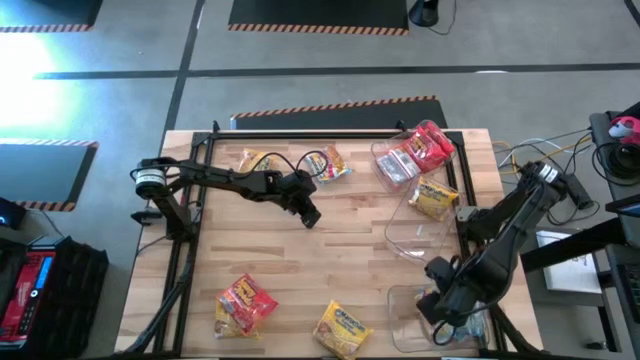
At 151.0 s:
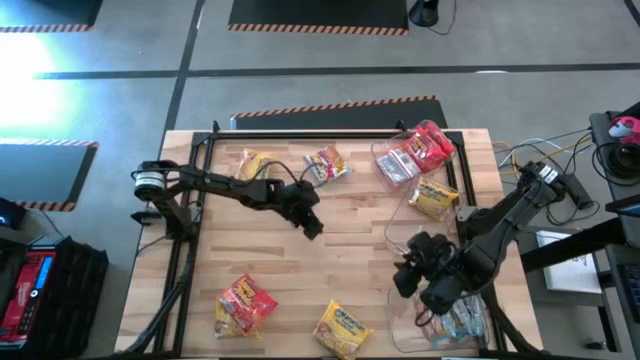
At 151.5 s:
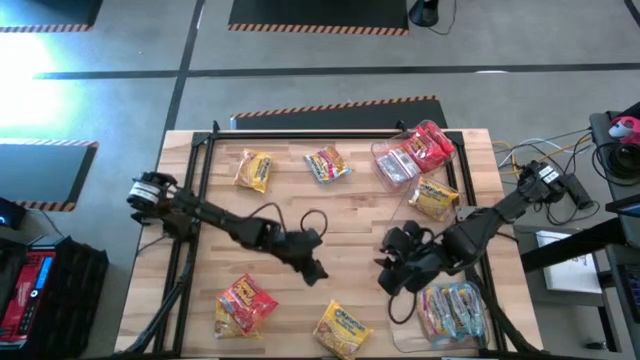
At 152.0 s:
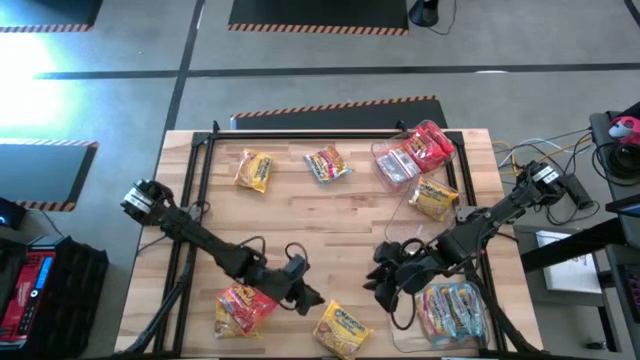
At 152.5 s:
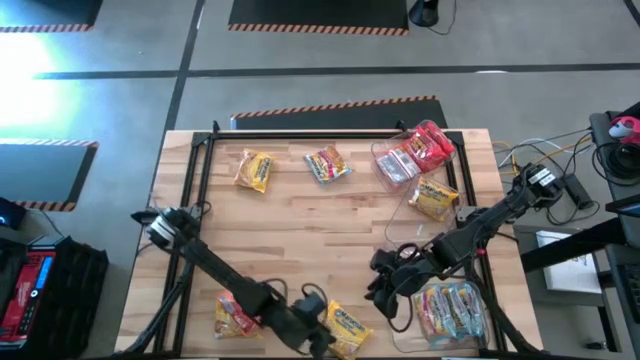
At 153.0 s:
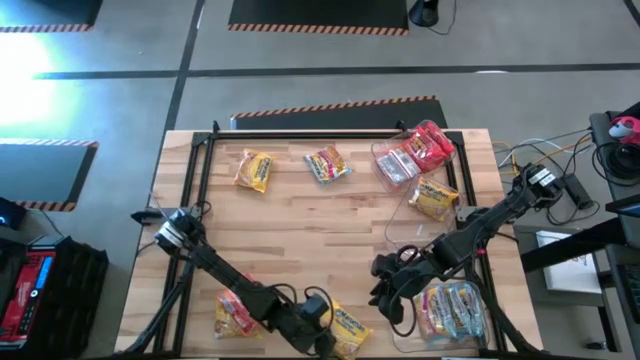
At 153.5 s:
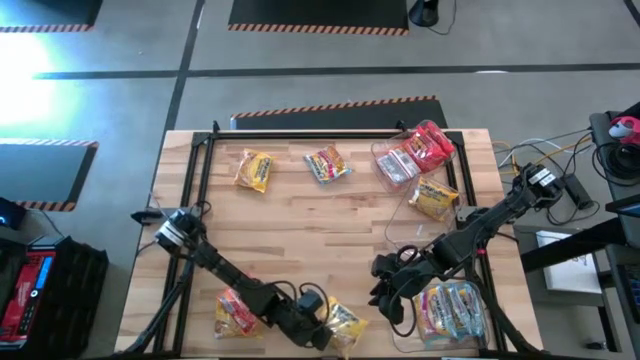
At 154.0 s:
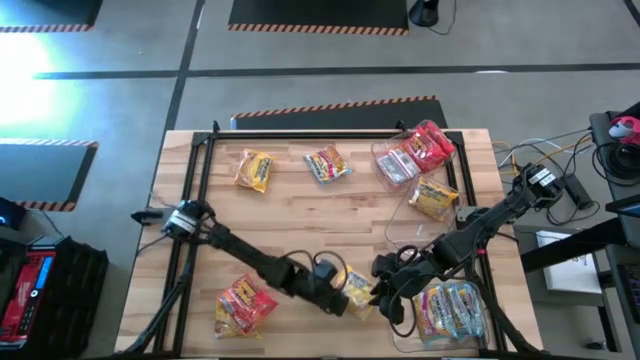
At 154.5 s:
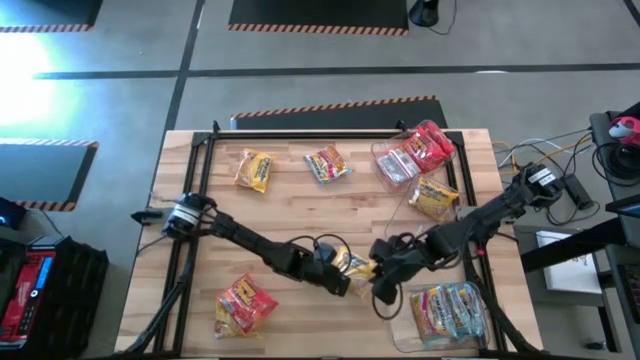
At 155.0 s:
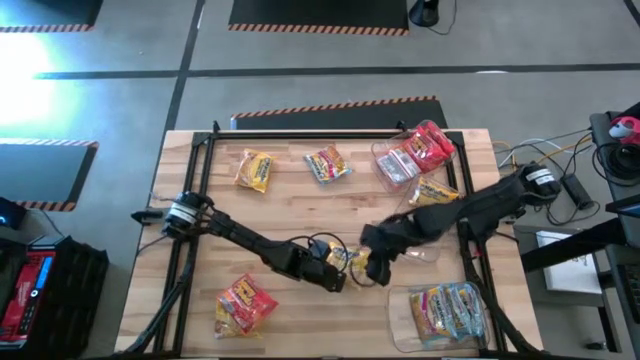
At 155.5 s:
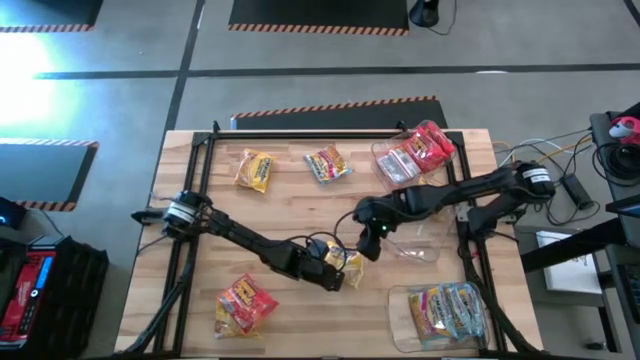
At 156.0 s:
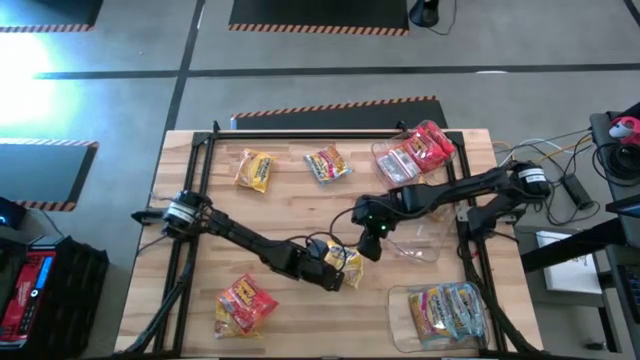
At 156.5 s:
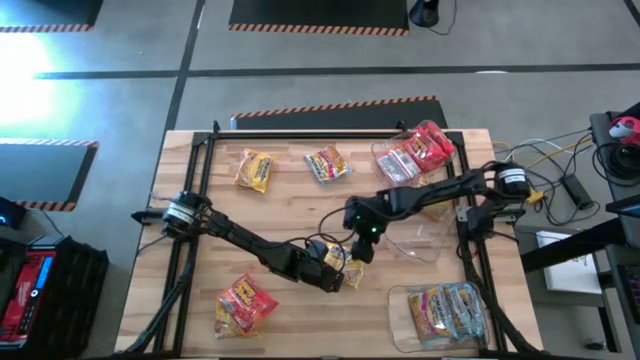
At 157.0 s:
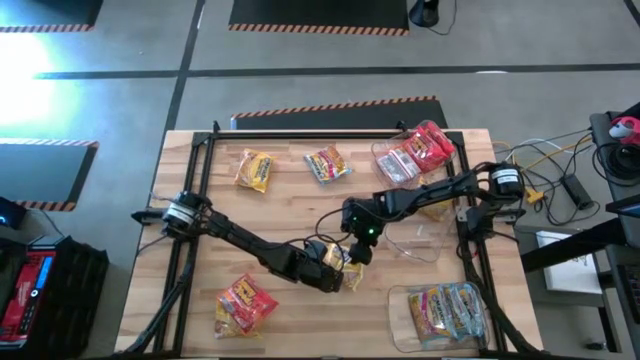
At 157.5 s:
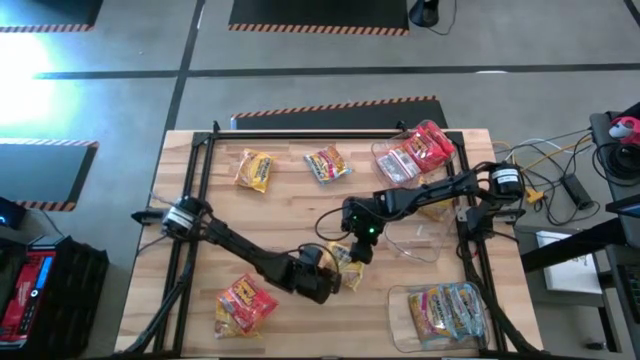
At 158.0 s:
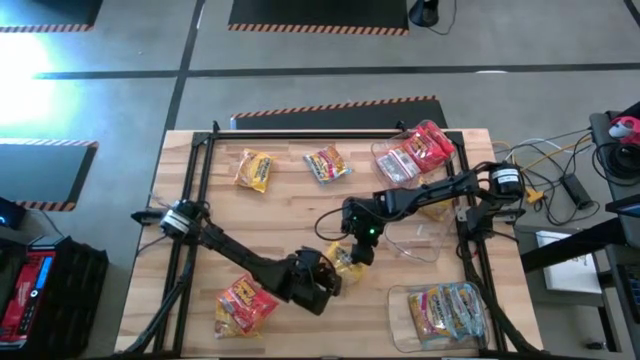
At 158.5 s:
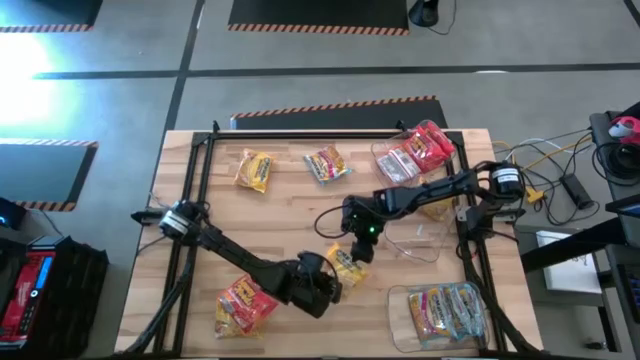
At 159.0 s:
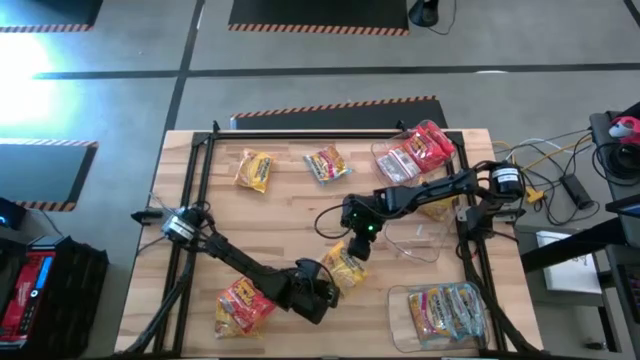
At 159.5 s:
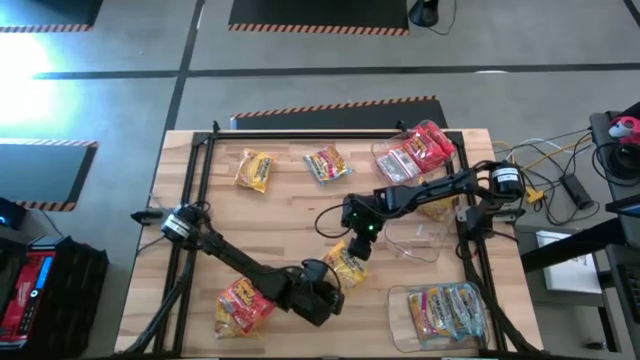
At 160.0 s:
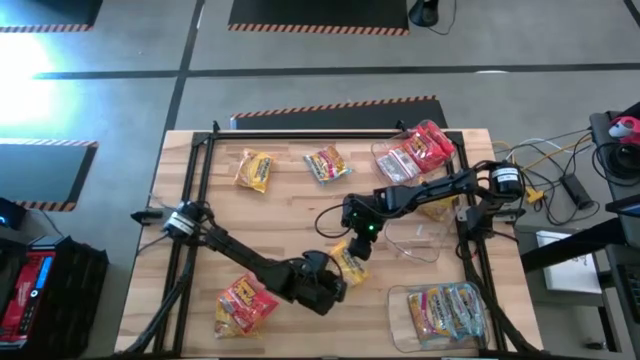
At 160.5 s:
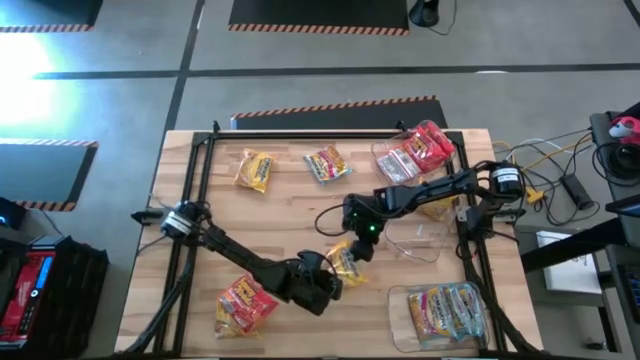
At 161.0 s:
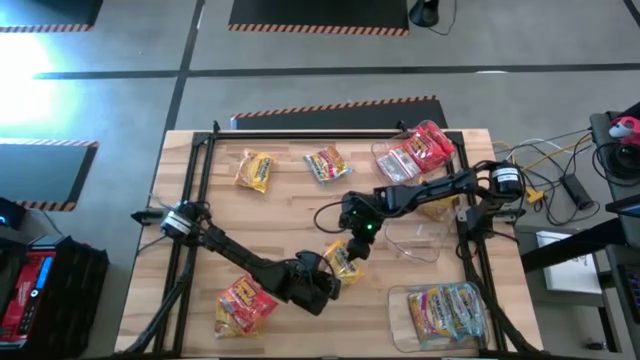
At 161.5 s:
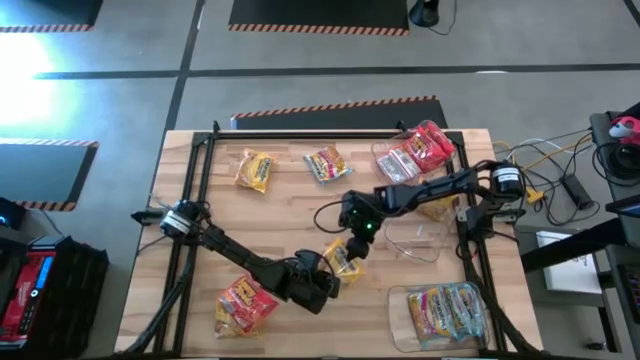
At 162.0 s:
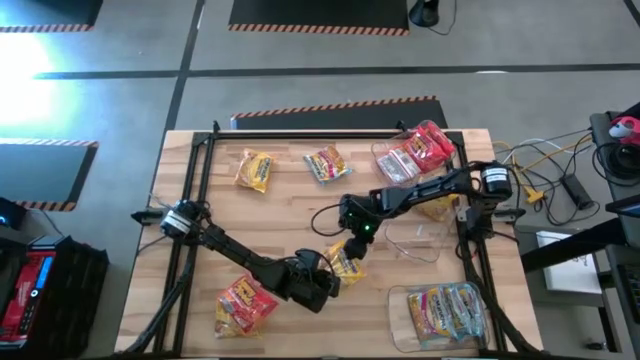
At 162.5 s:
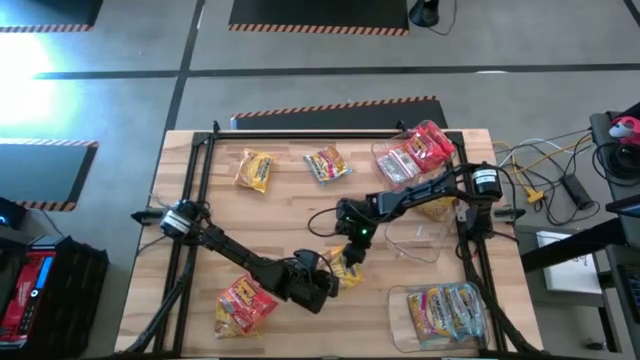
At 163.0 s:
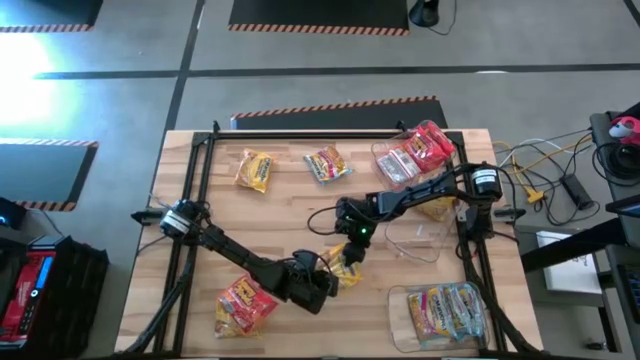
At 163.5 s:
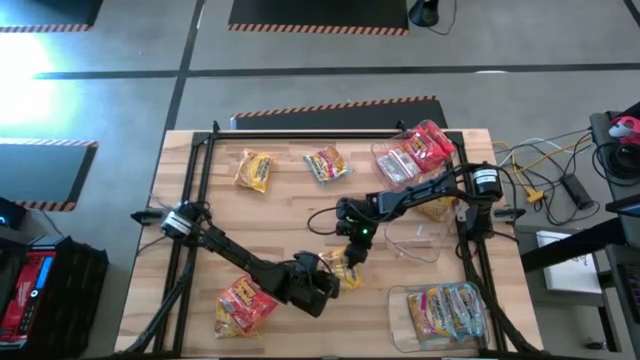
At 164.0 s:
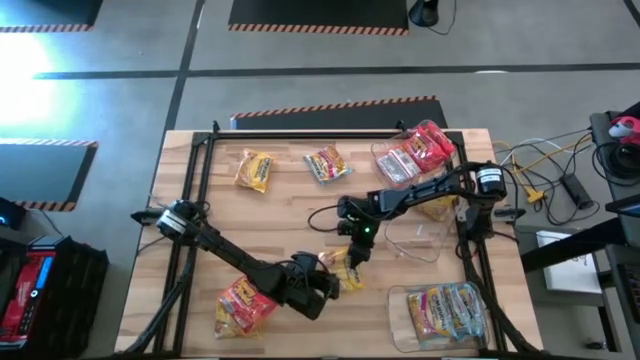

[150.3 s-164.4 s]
Task: Sort Maruchan noodles
Put the yellow noodle pack into the middle transparent bin

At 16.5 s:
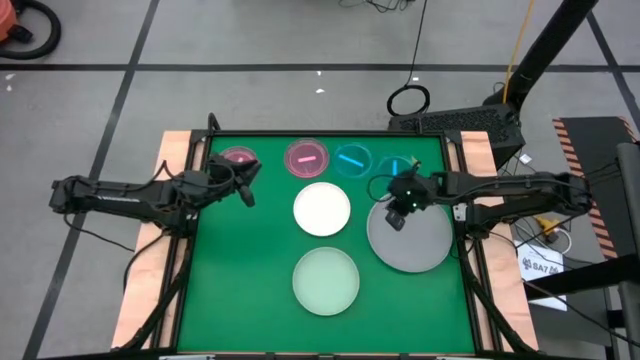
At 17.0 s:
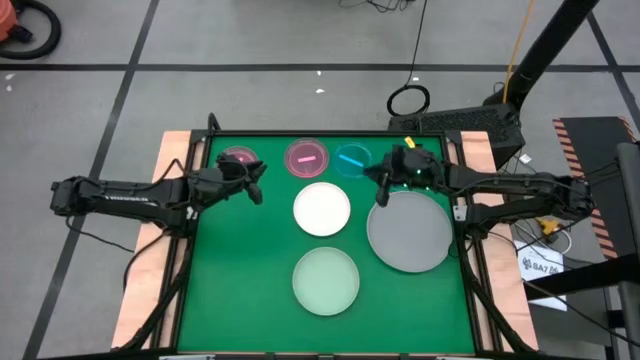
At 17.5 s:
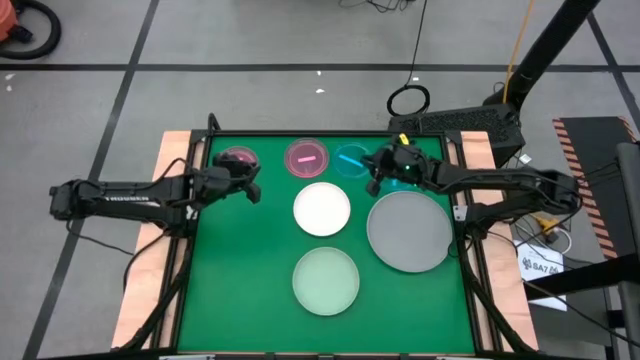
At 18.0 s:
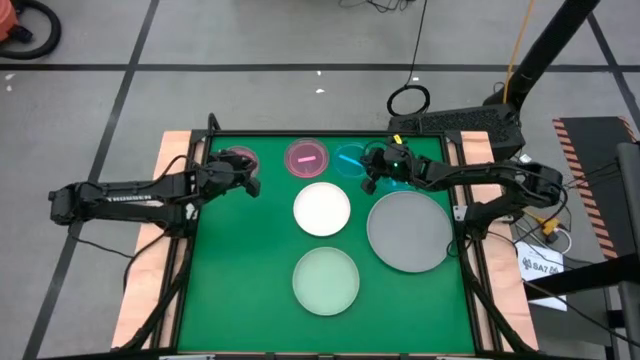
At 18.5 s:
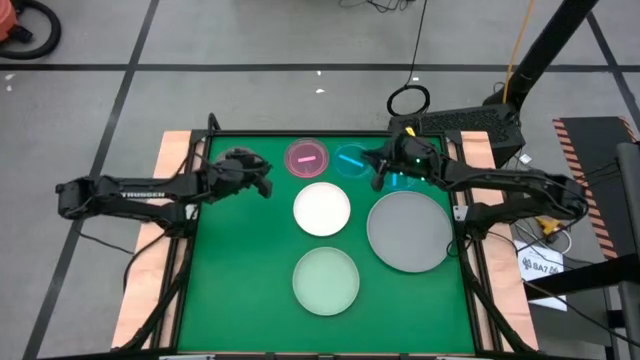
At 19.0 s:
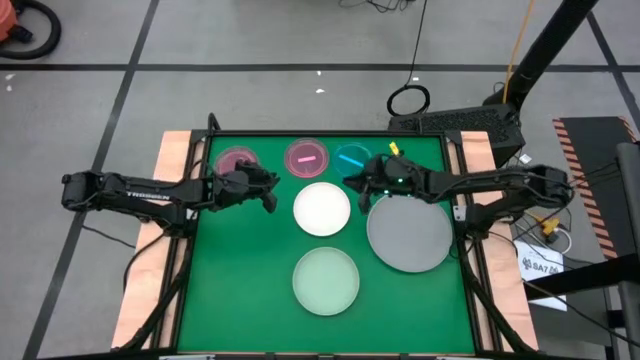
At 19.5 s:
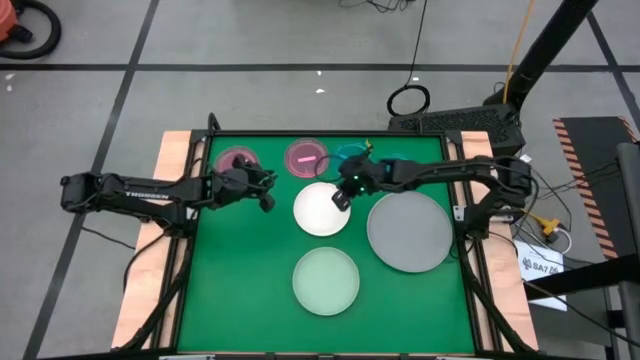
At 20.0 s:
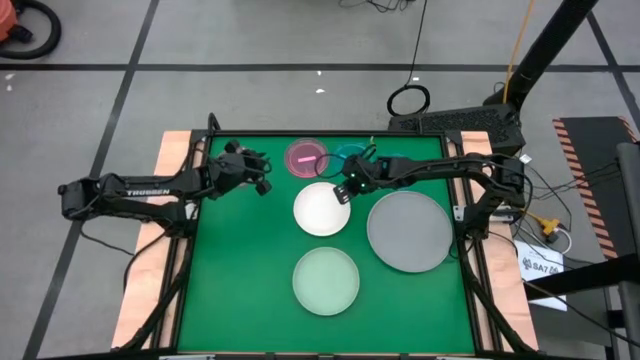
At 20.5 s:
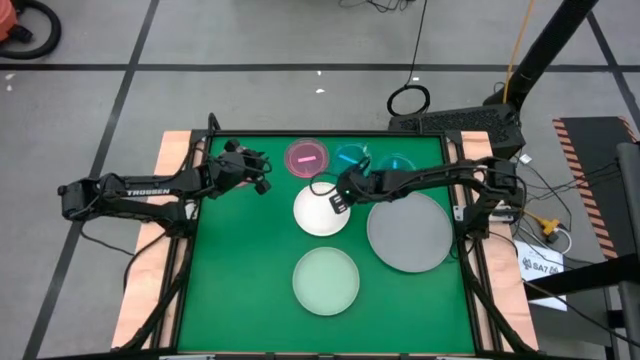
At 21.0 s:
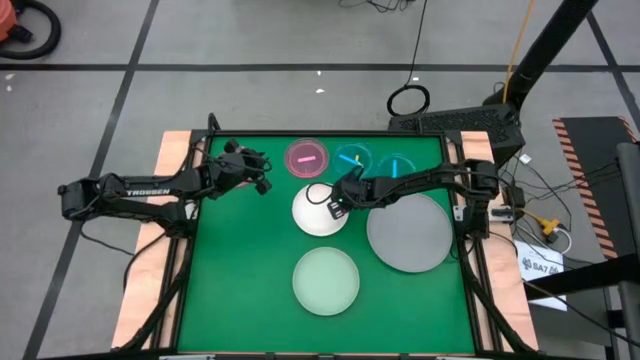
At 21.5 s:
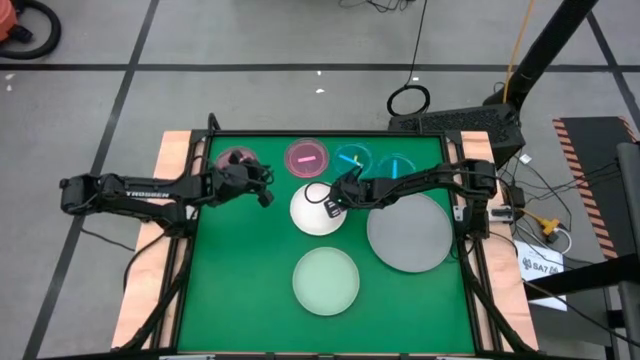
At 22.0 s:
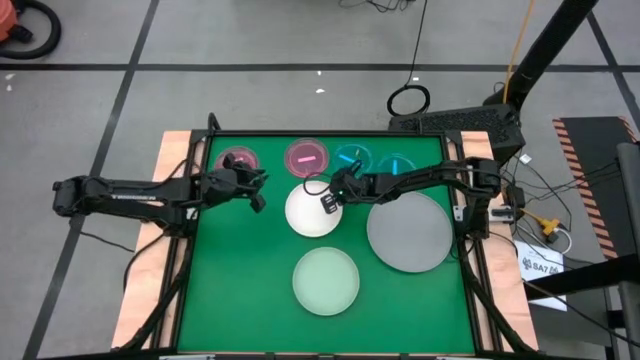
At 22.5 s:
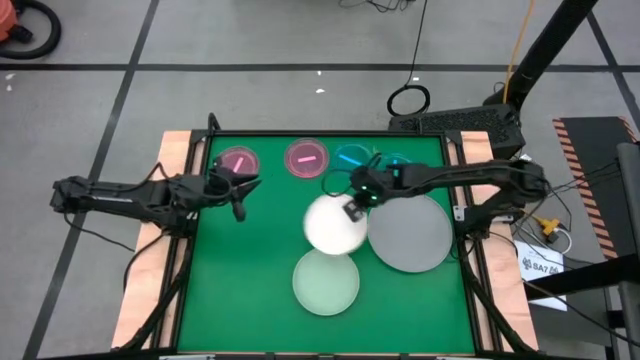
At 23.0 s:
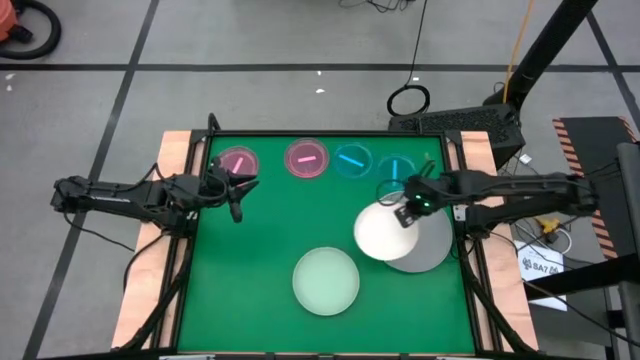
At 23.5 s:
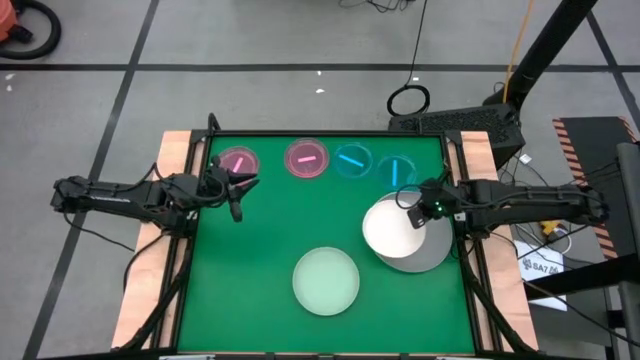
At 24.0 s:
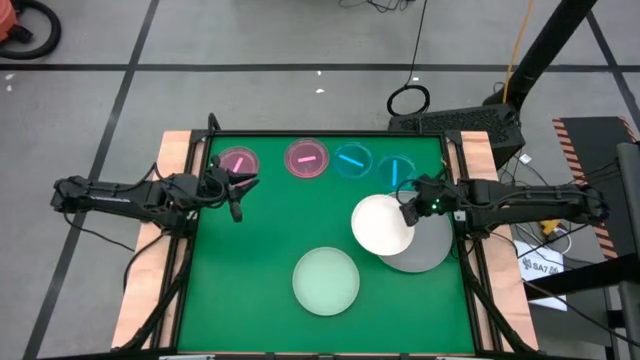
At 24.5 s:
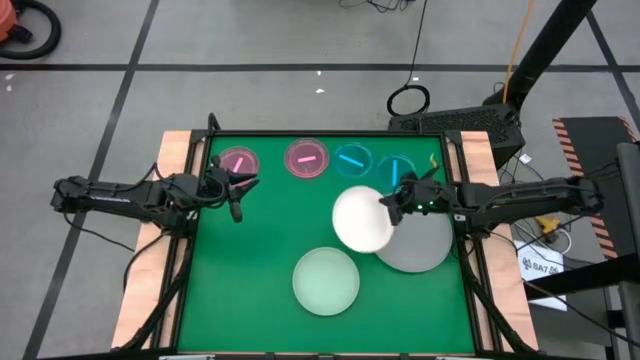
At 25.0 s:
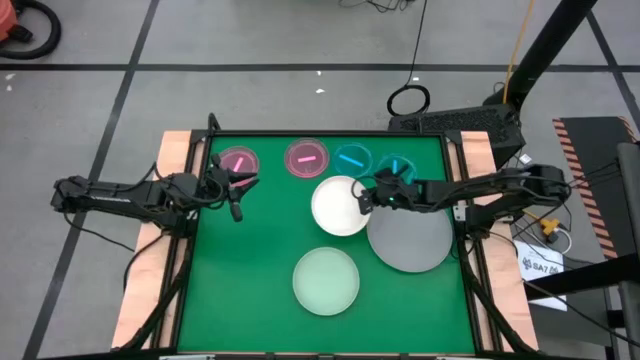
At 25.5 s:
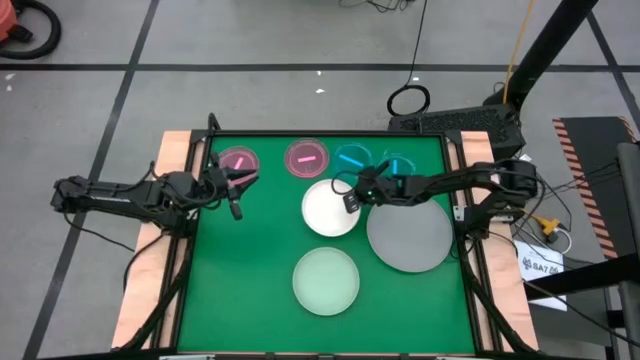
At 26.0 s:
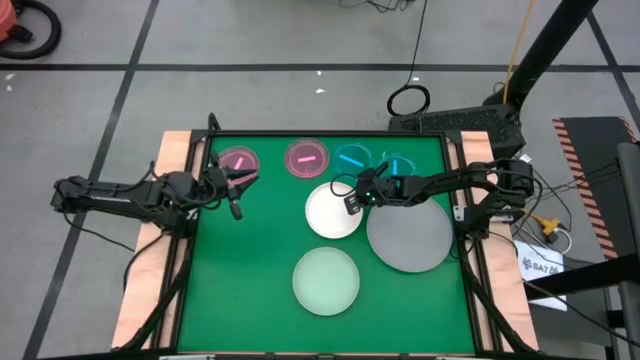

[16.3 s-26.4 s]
Task: Stack plastic plates
Stack the white plate on top of the gray plate
